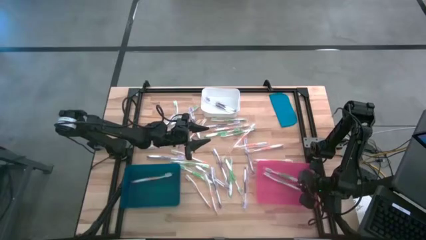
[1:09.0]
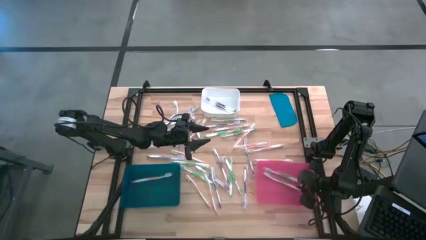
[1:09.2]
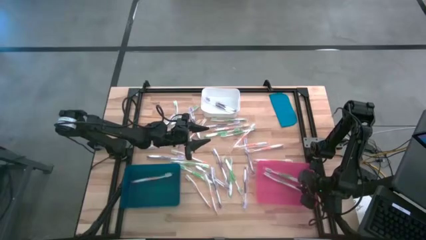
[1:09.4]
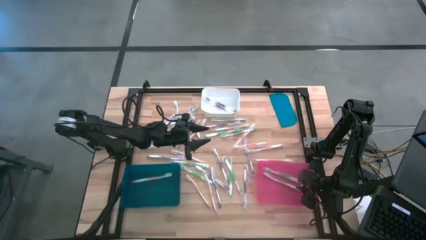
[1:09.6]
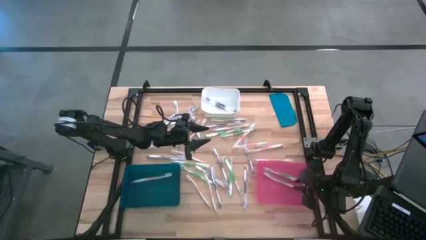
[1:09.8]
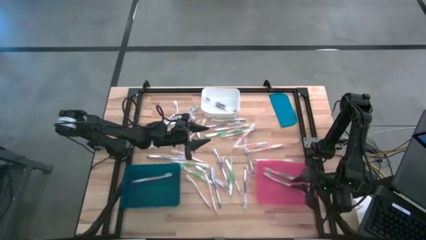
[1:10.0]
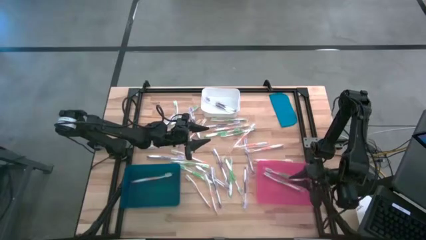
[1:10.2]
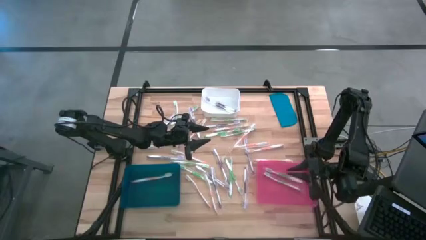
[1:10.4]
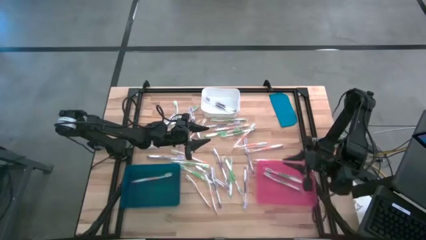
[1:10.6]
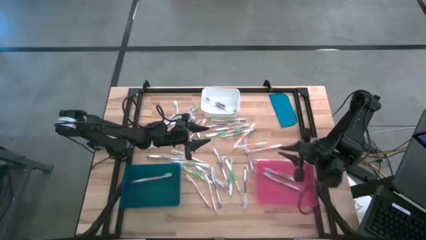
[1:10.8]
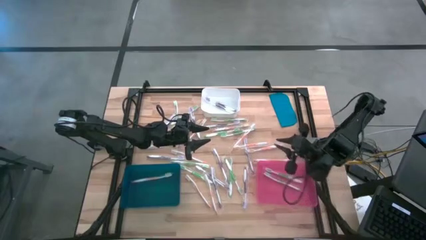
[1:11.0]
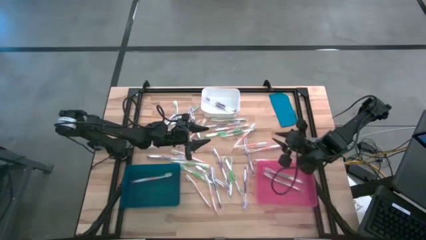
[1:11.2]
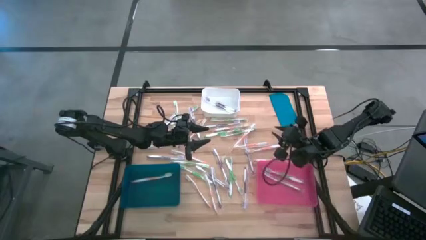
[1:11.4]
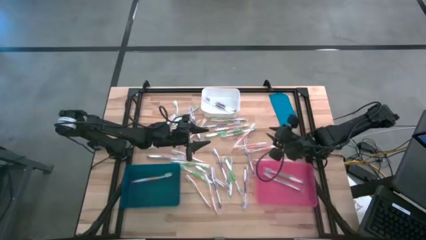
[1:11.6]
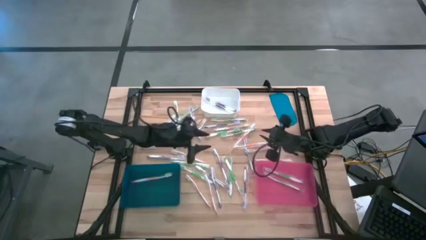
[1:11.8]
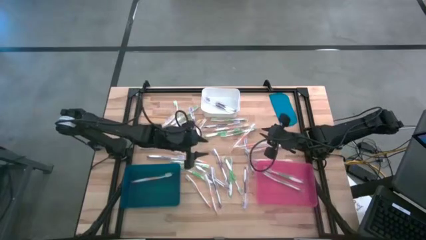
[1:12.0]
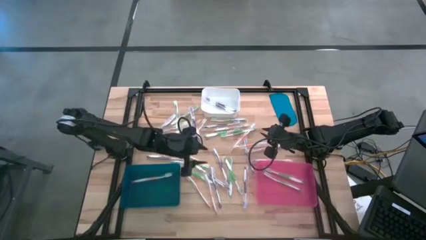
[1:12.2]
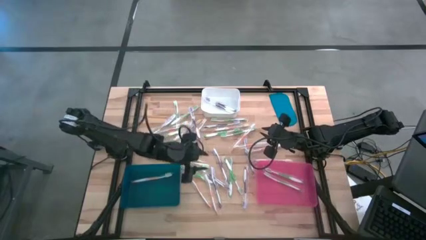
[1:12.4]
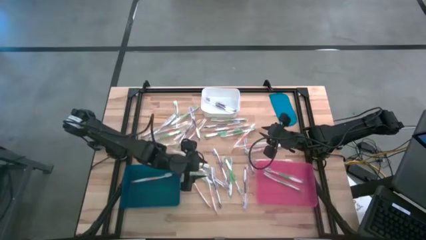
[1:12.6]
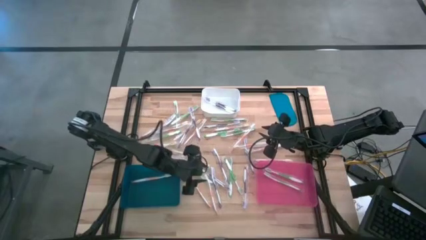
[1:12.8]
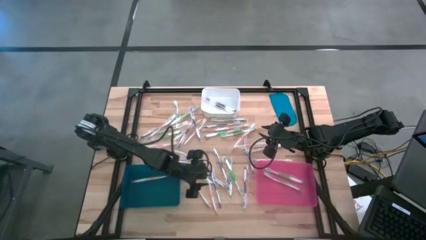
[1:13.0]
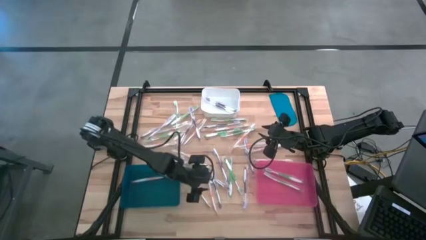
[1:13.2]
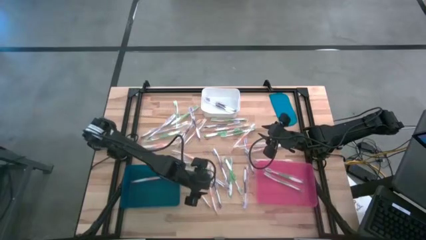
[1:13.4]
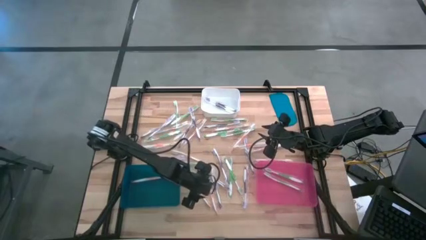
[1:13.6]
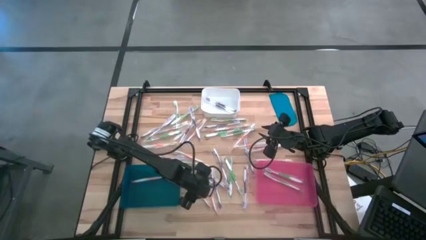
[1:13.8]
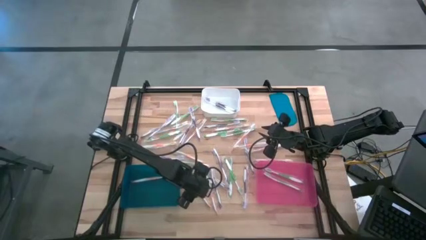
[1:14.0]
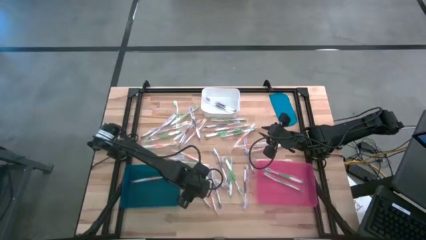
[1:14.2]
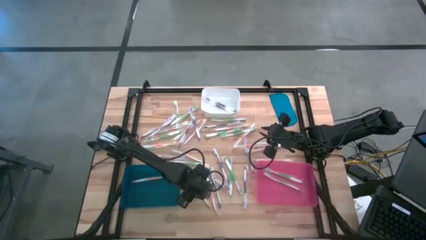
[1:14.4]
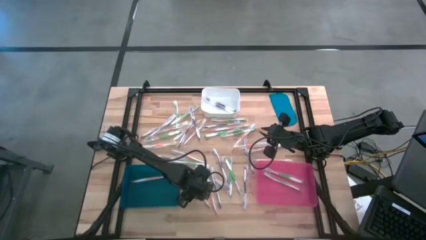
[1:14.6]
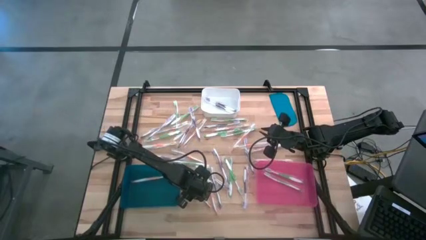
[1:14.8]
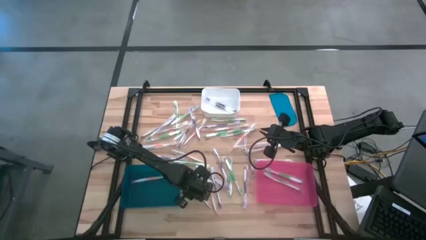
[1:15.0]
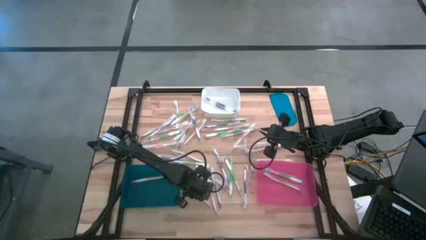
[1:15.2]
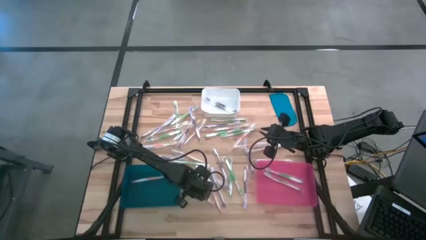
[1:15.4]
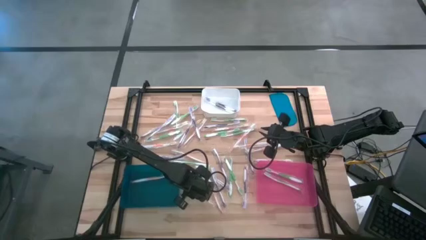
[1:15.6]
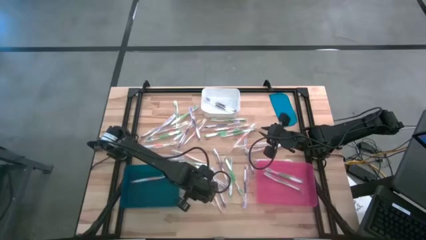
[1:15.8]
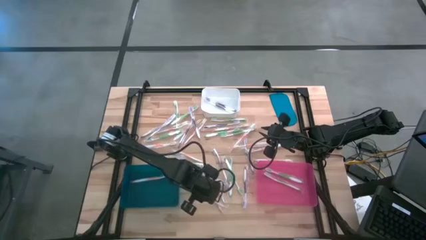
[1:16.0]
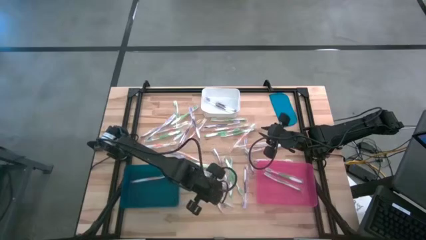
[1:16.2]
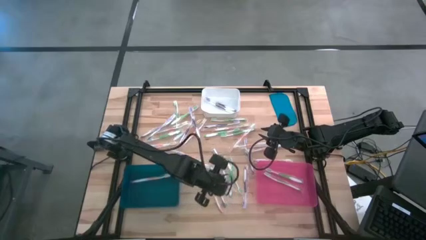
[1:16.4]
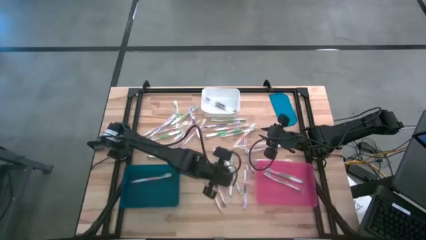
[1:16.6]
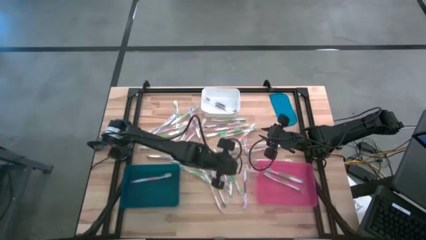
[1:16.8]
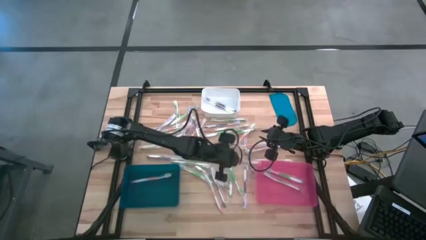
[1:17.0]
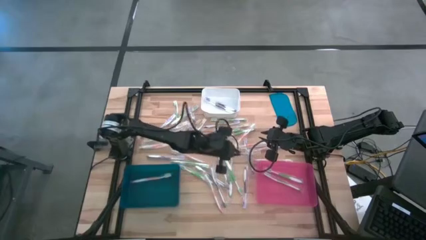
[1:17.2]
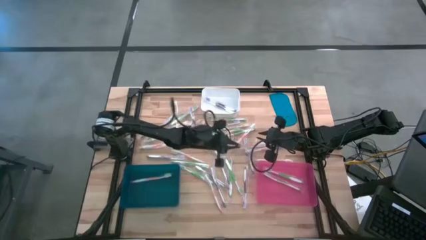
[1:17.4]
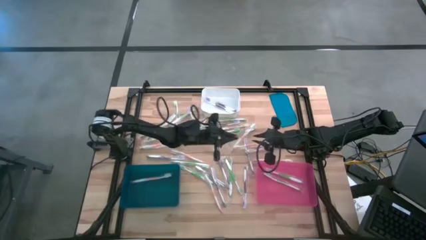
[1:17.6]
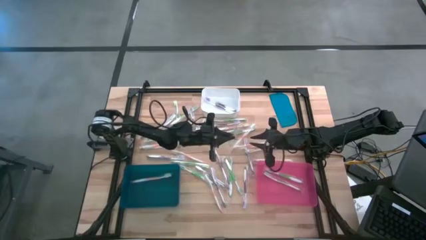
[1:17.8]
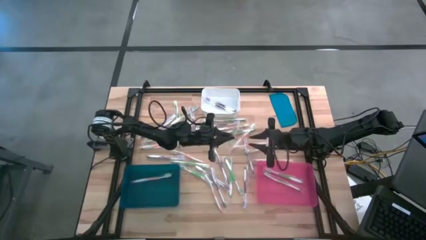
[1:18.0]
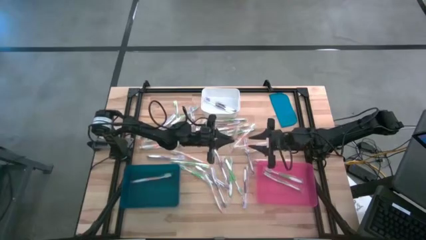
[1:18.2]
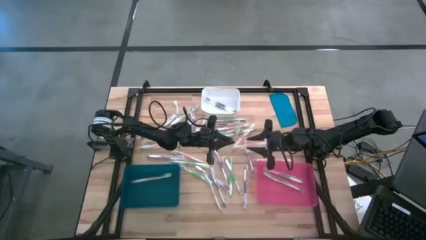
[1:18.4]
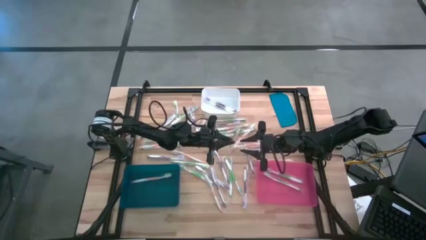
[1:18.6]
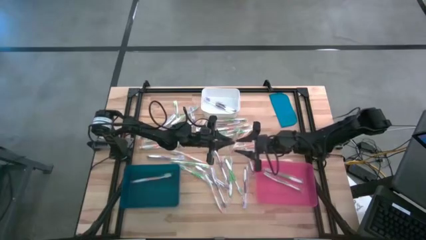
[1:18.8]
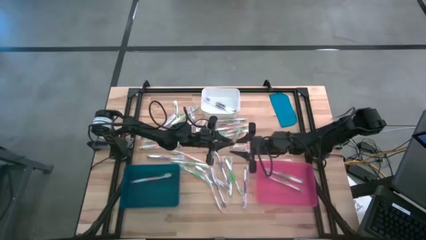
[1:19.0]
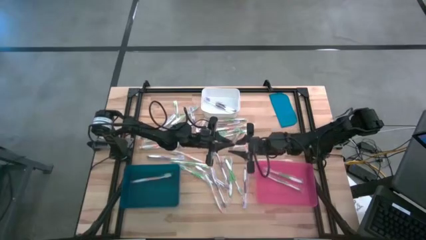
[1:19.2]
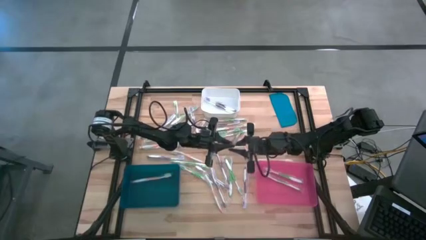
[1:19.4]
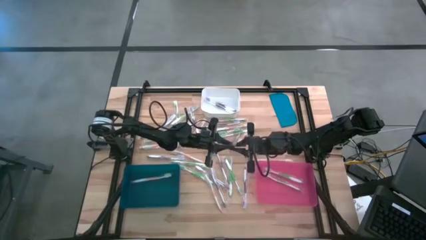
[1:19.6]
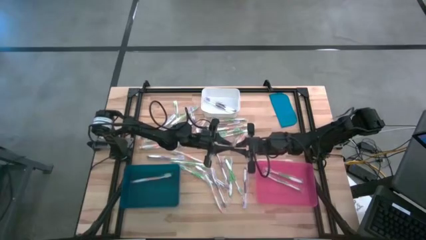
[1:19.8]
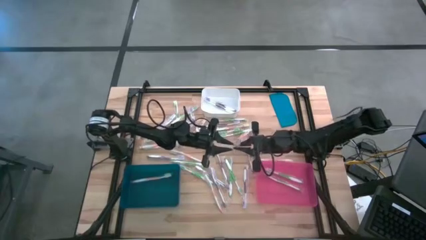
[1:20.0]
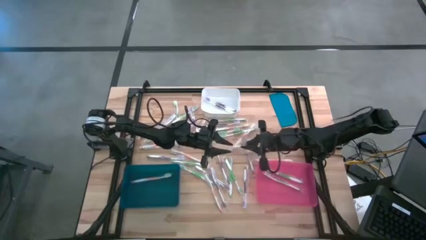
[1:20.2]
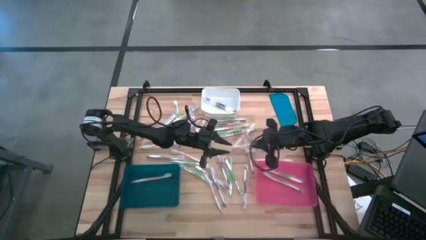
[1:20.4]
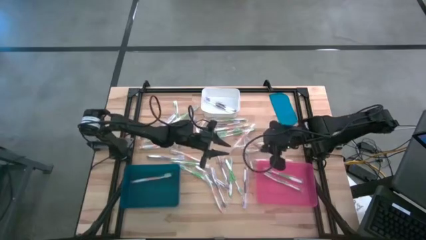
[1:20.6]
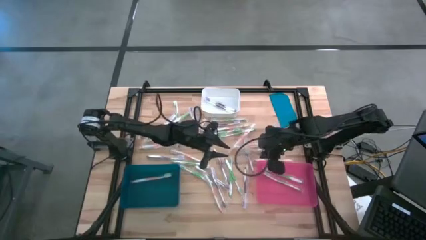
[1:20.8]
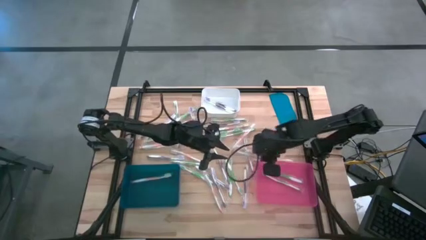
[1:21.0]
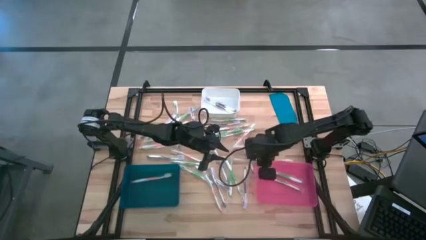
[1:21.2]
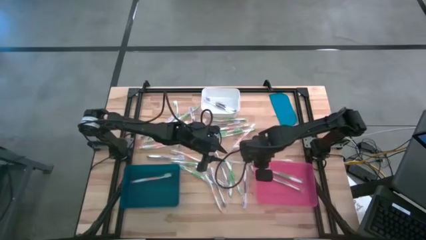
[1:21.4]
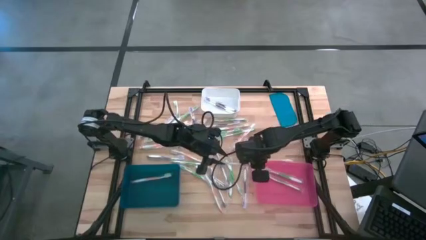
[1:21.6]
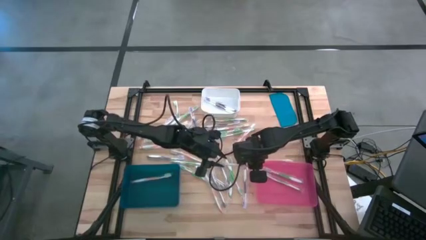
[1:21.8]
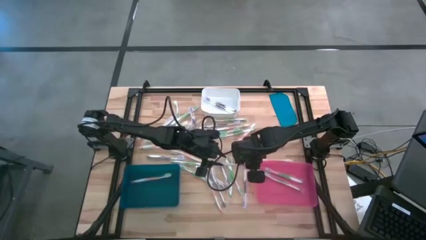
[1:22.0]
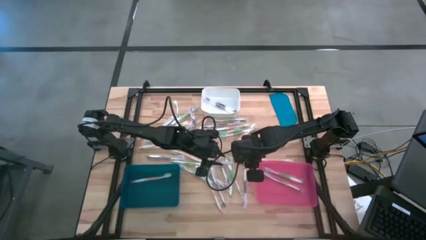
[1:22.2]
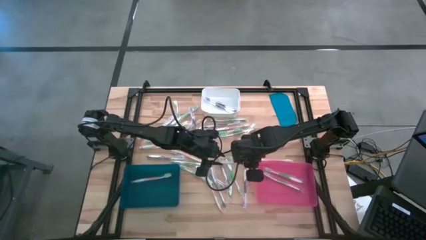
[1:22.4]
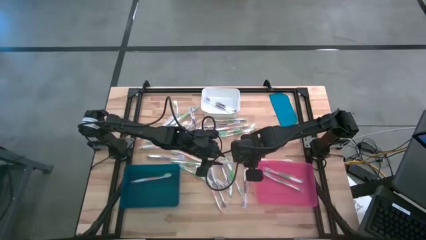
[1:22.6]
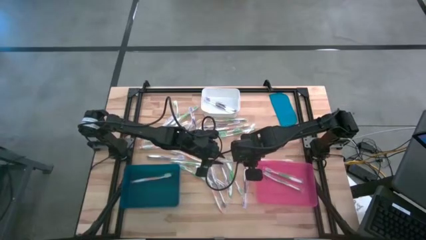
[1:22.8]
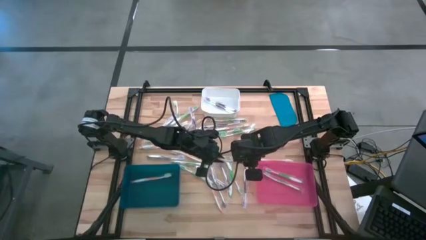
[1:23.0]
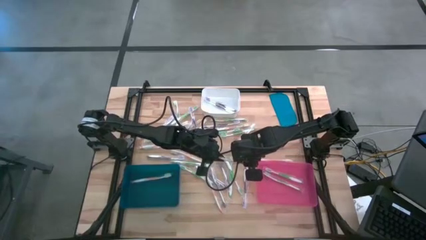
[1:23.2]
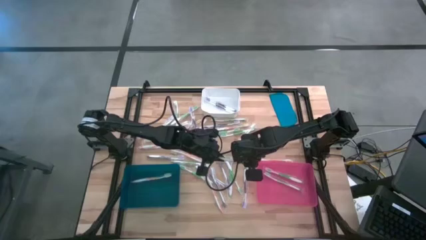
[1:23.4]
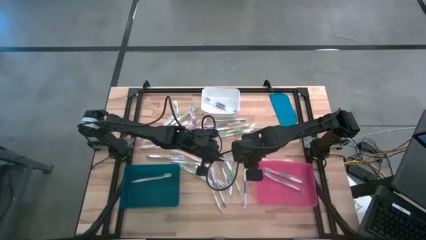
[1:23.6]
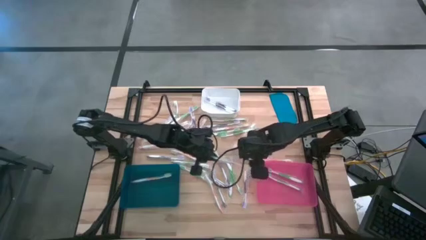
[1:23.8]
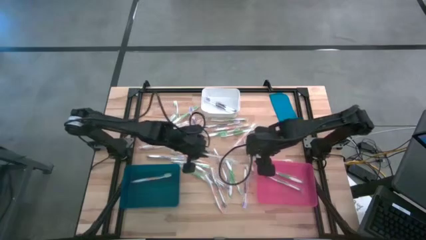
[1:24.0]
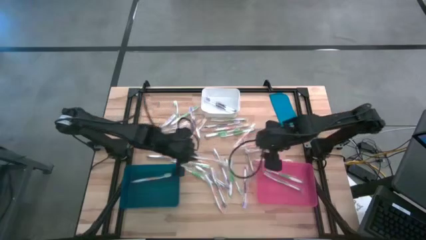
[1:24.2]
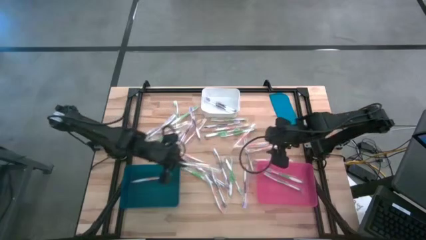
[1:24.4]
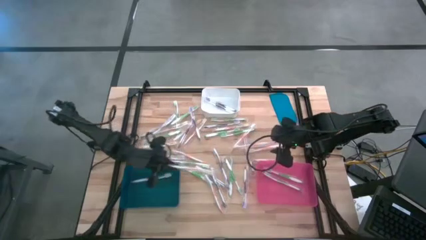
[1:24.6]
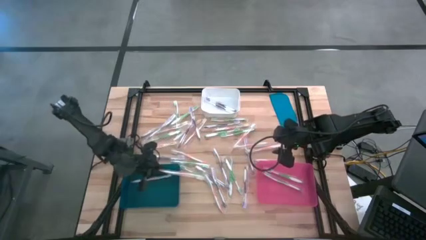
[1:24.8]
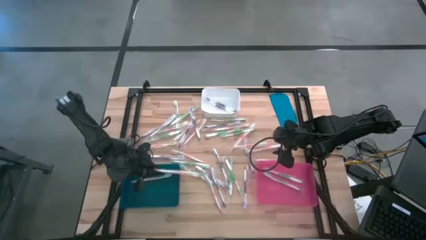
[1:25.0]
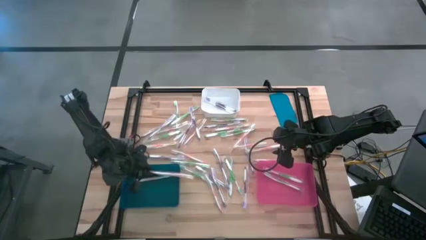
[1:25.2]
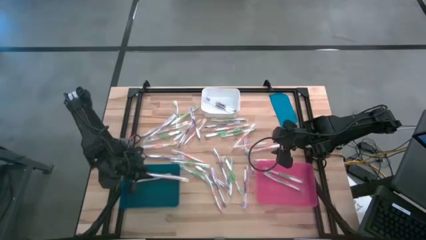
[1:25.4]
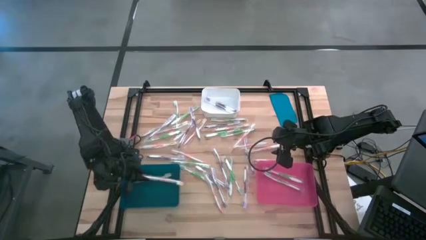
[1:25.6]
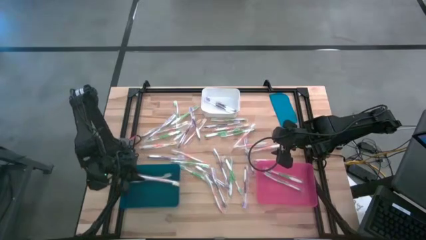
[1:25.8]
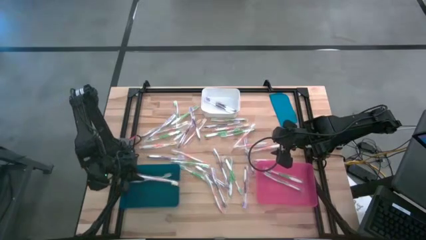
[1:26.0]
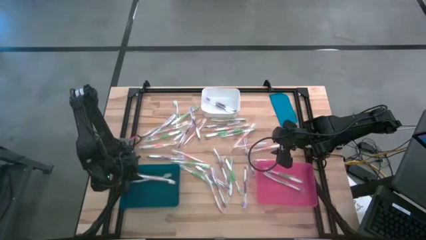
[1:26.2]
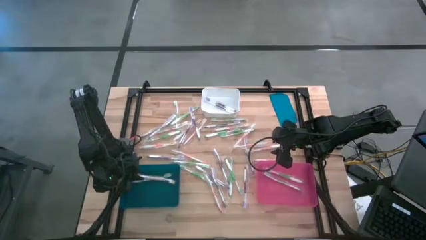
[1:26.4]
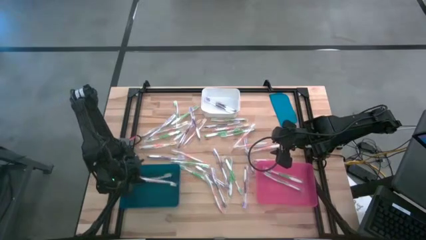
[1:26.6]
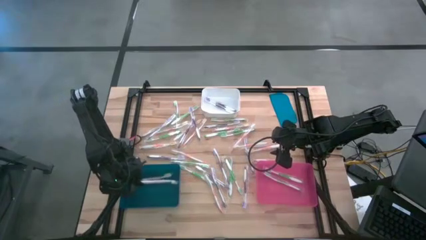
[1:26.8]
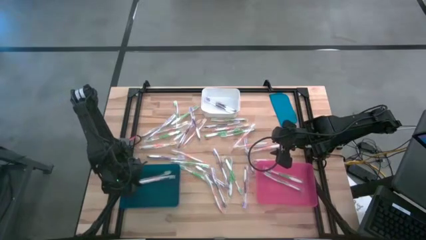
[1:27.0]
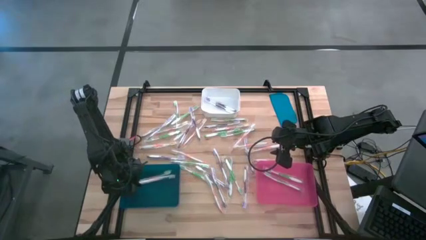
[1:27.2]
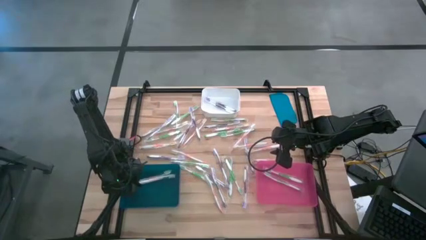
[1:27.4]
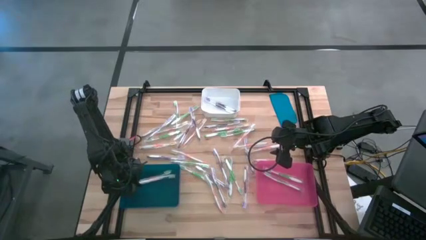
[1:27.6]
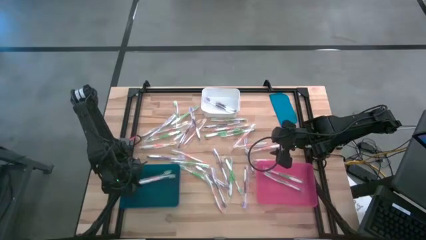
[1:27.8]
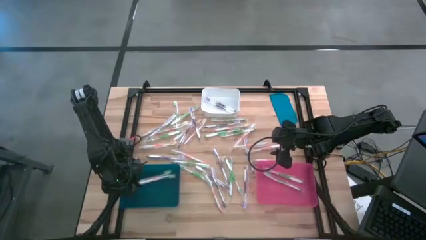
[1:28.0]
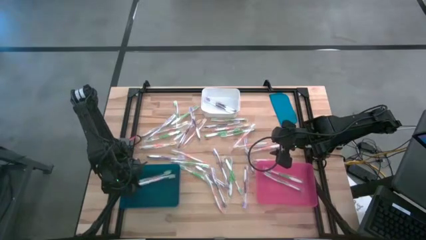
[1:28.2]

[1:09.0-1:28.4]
Task: Pick & Place Toothbrushes
Put the orange toothbrush into the blue bin
